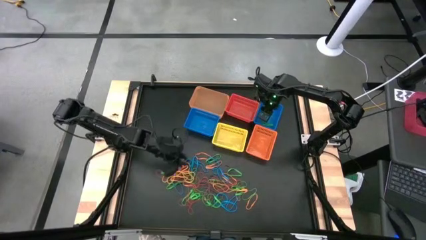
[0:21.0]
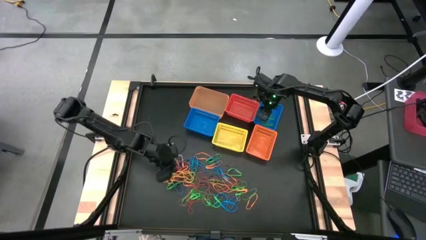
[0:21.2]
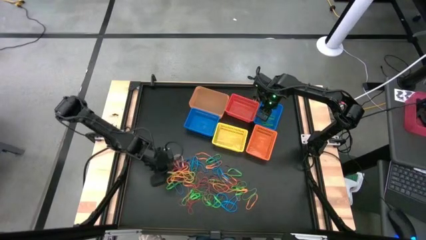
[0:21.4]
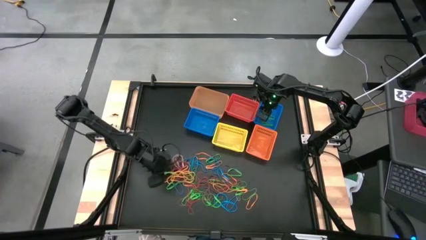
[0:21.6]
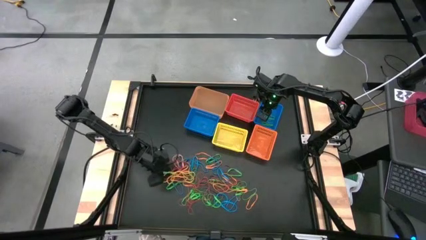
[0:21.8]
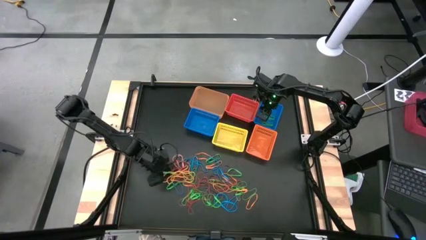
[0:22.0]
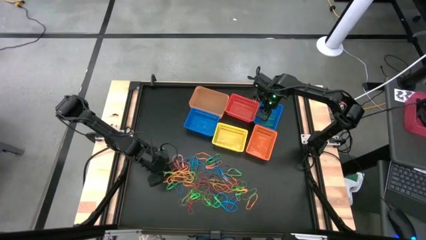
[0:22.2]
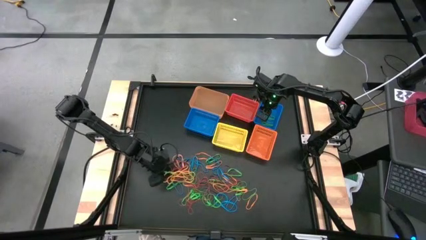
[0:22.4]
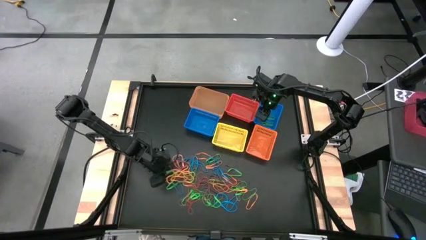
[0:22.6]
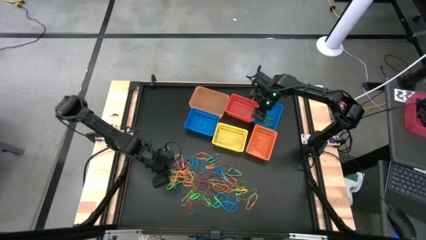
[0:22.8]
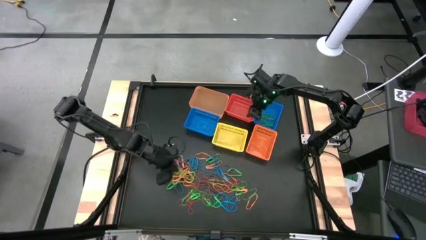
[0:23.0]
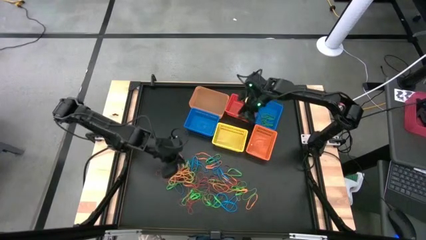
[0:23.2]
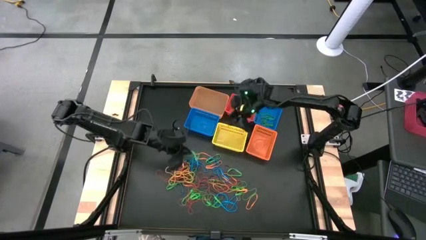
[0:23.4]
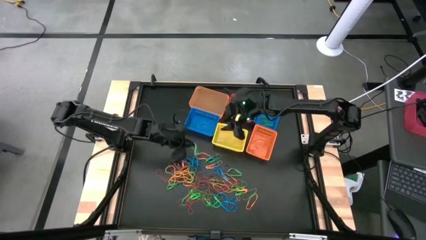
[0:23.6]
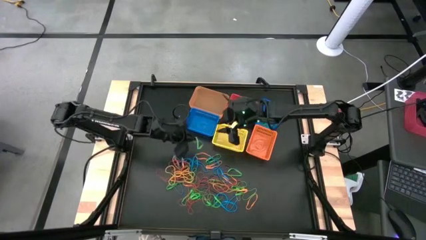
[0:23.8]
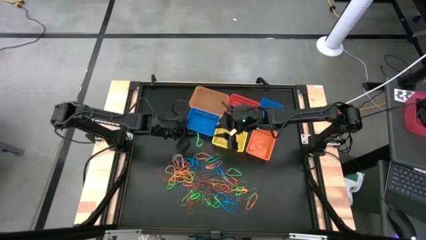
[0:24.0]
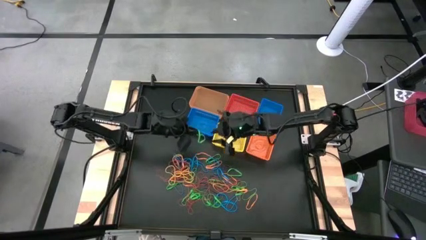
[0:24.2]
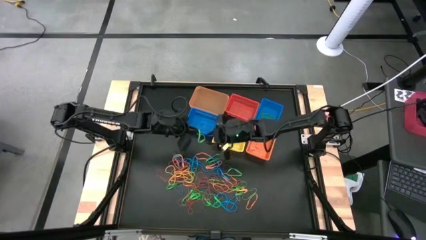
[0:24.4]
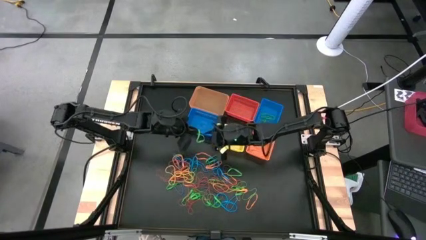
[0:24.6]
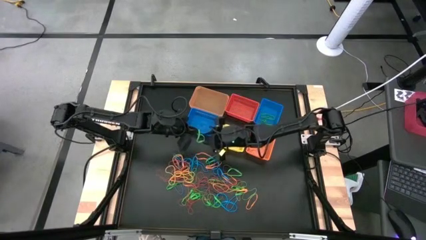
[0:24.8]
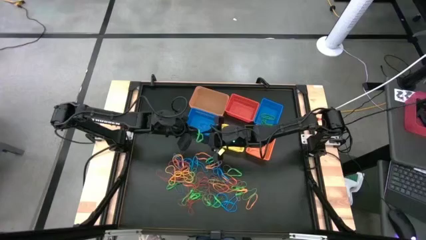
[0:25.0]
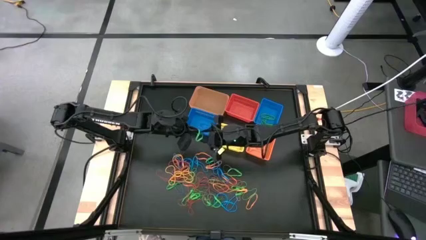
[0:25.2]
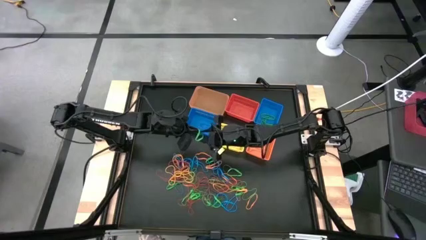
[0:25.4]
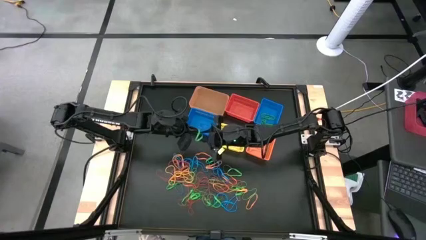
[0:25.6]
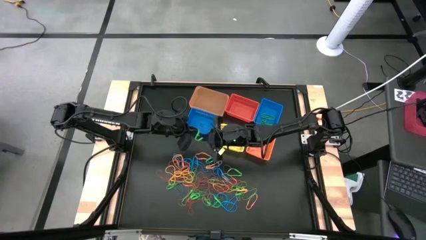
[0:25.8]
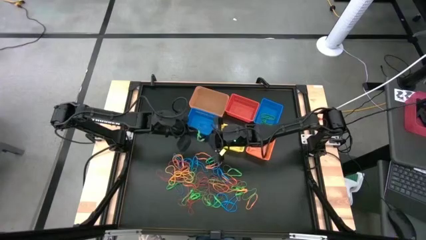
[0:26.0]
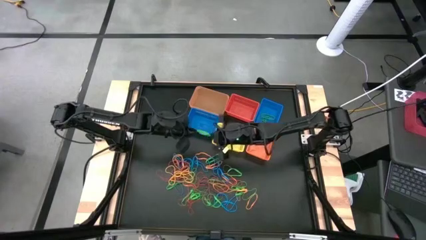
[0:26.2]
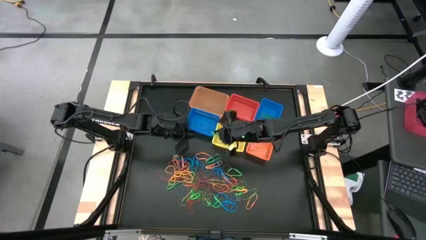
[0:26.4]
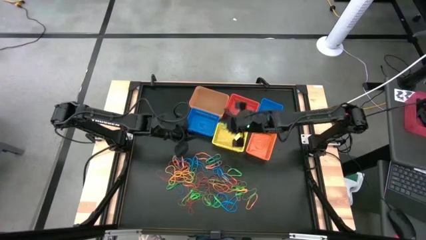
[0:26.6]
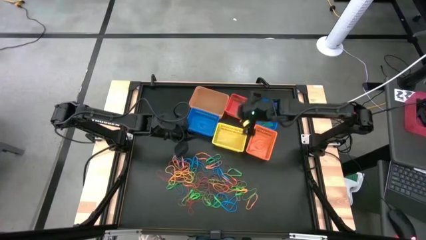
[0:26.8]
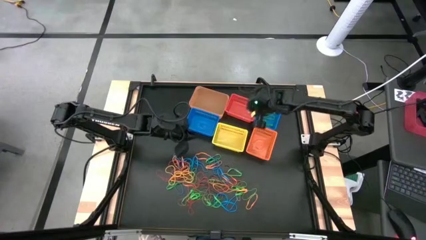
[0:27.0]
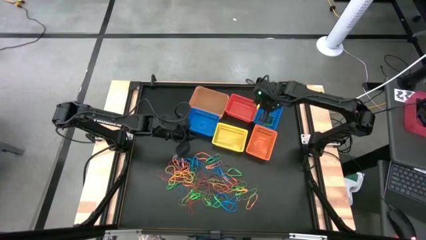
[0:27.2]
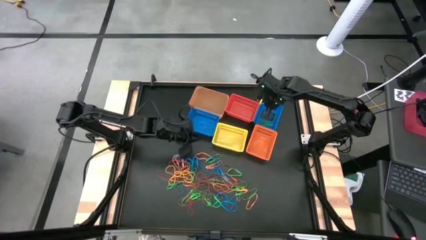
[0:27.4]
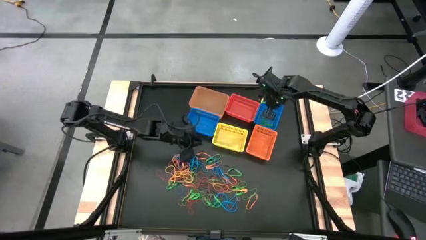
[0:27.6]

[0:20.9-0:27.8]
Task: Sort rubber bands into baskets
Put the green rubber band into the right blue basket

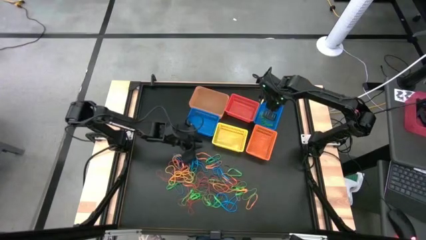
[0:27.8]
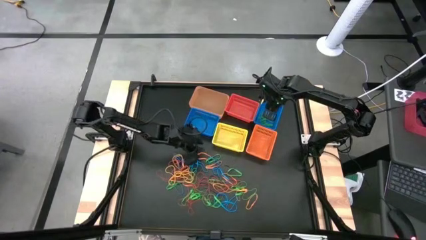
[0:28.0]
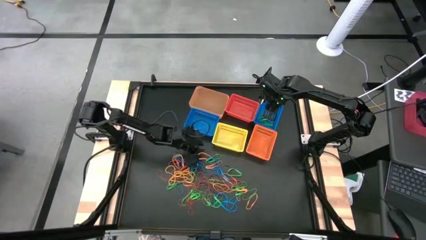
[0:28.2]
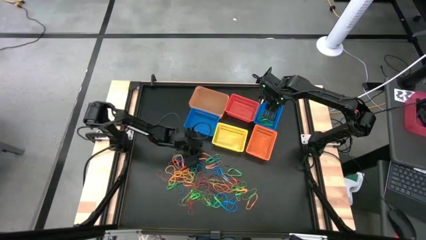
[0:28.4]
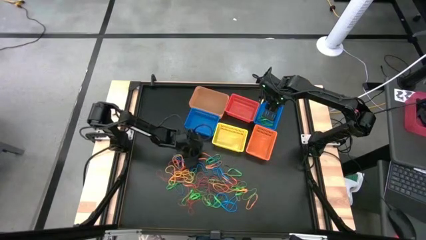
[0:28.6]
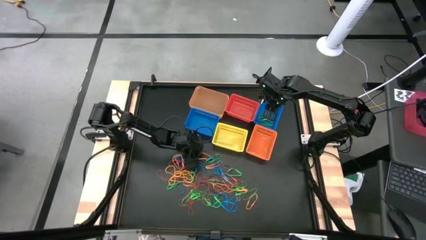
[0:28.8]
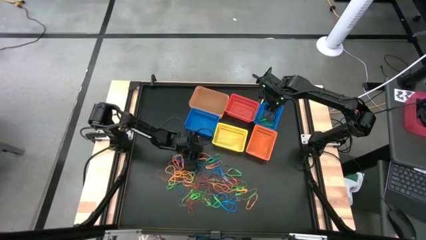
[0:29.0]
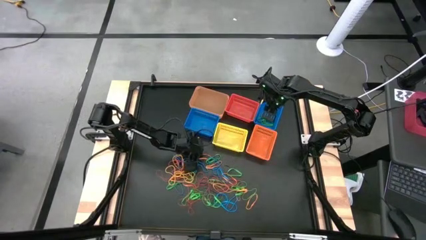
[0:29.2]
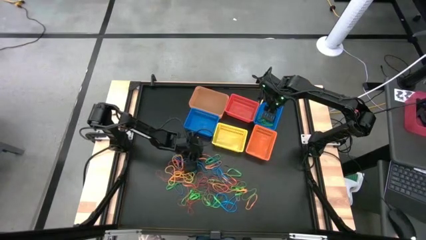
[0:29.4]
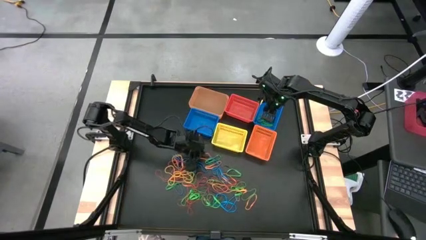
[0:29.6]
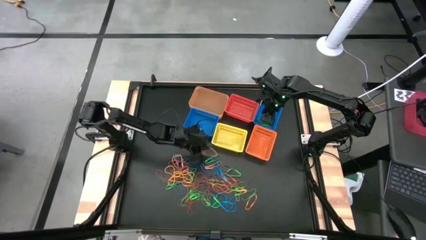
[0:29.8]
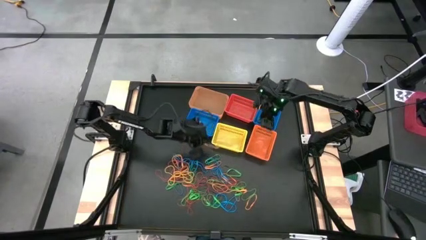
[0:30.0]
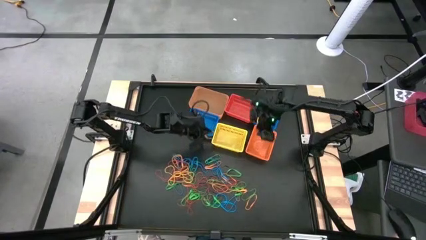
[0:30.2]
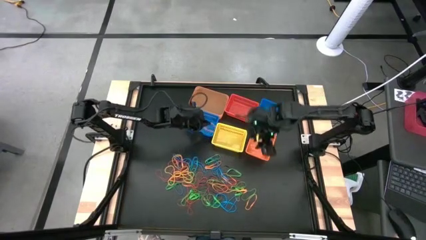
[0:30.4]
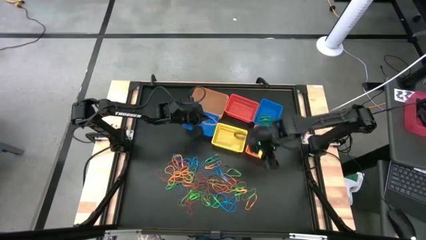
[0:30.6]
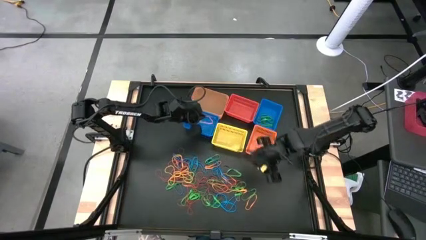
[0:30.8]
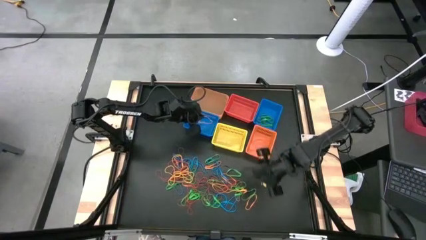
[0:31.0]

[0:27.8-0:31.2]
Put the orange rubber band into the left blue basket

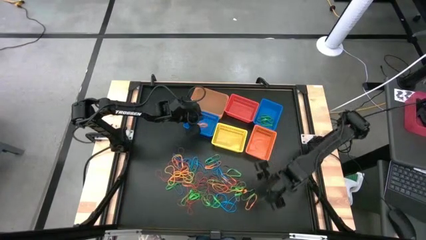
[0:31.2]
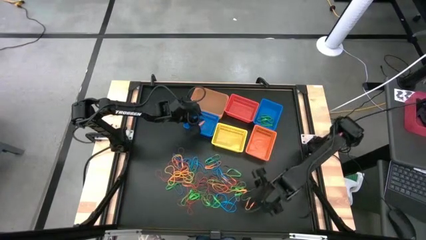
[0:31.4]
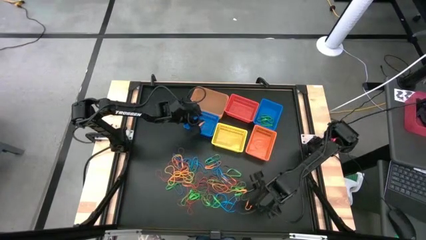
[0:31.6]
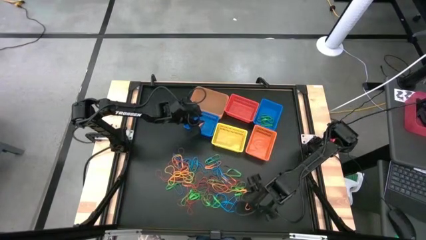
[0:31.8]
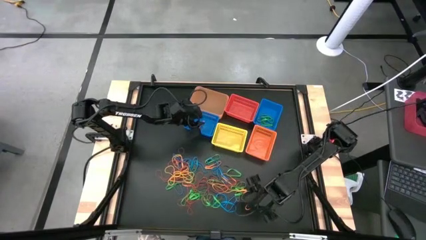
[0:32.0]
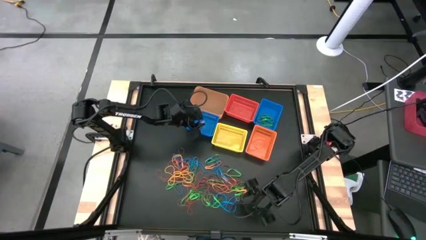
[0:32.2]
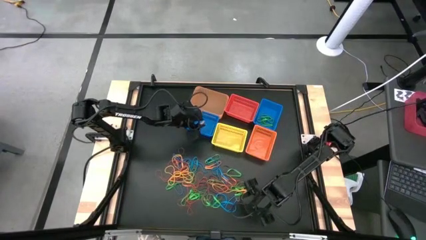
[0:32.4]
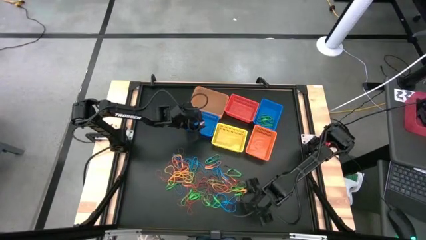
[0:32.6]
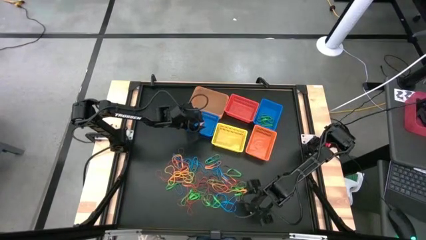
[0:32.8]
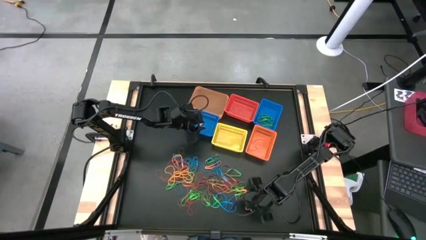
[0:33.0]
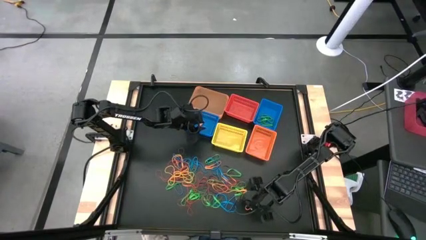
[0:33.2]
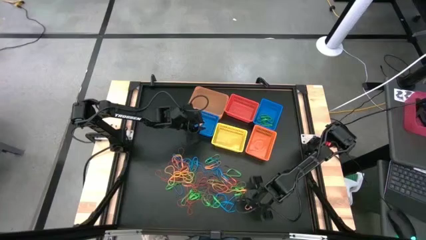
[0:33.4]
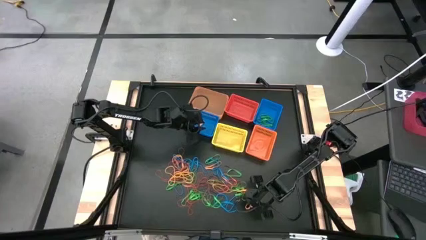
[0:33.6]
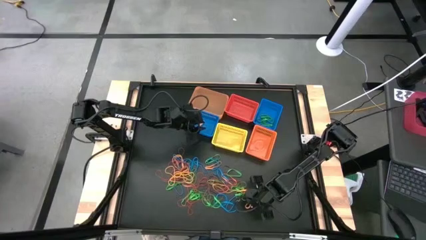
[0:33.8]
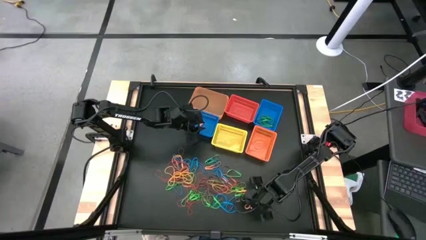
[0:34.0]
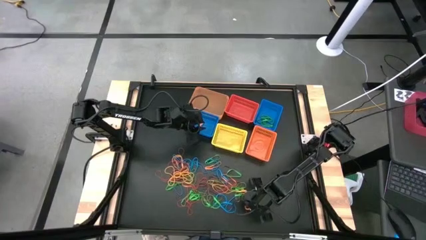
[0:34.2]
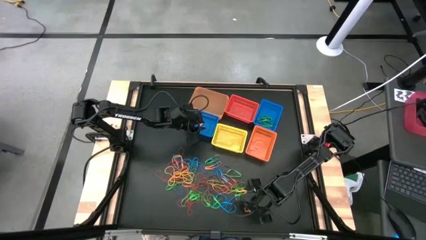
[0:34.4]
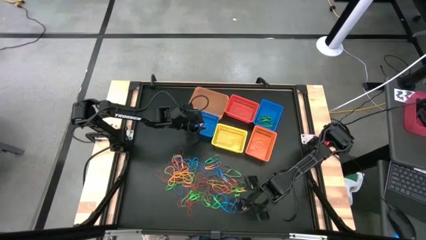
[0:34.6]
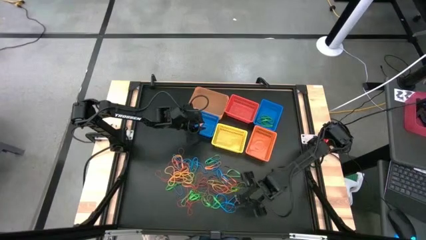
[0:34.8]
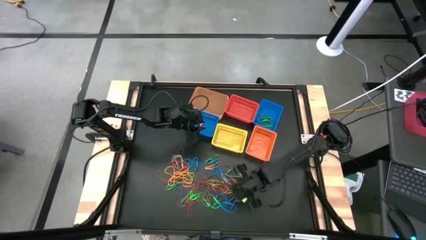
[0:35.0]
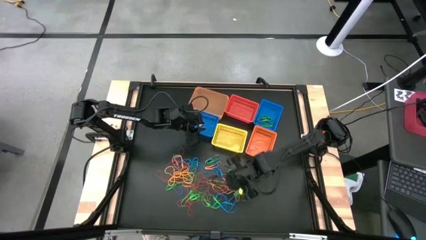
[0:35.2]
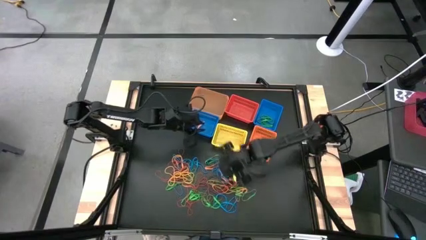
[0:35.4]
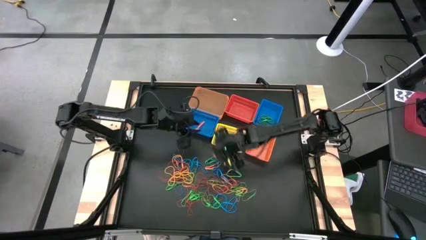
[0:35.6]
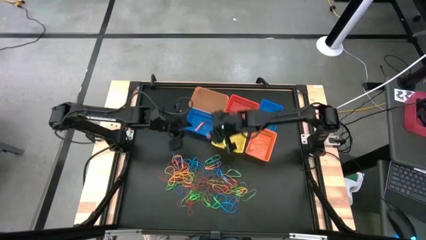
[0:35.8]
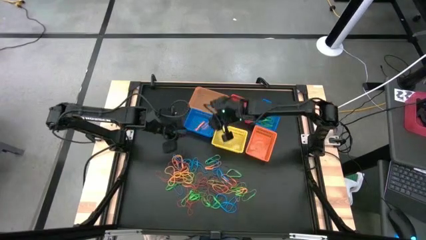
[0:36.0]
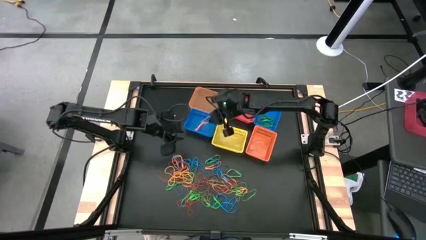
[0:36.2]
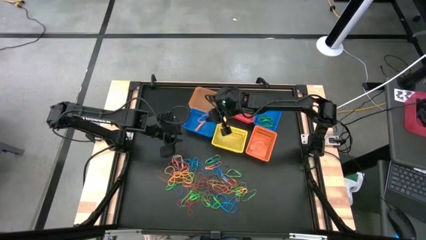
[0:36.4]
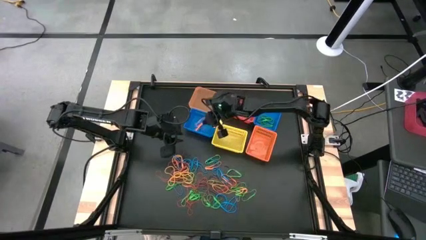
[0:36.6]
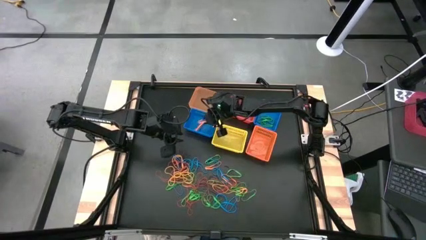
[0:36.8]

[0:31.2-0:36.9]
Put the orange rubber band into the left blue basket

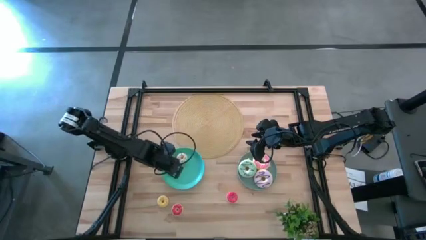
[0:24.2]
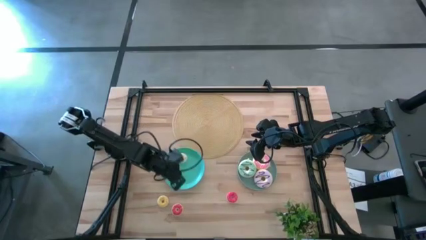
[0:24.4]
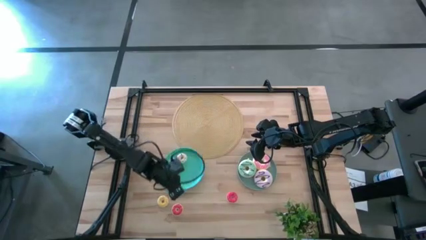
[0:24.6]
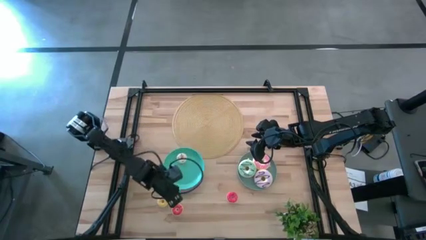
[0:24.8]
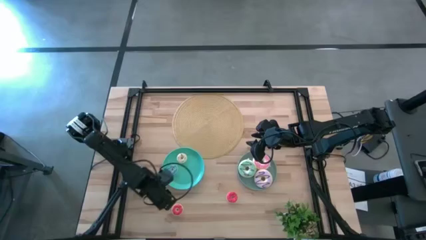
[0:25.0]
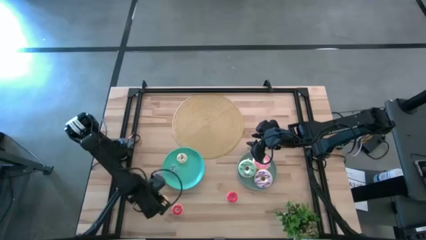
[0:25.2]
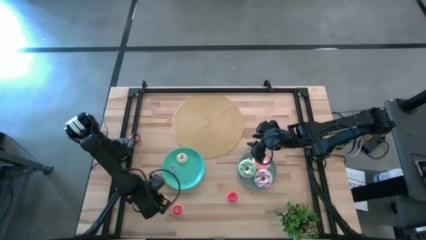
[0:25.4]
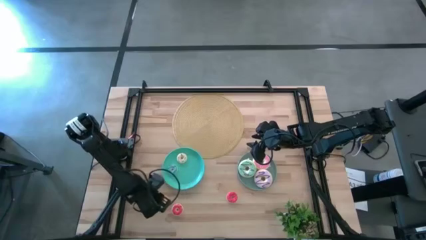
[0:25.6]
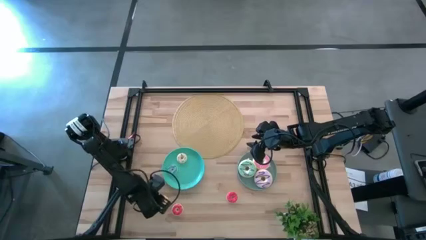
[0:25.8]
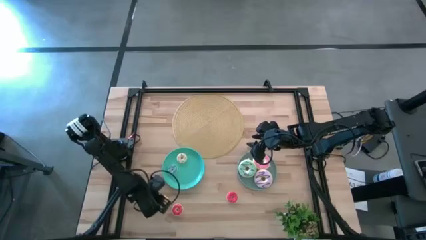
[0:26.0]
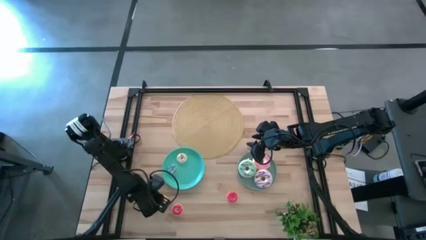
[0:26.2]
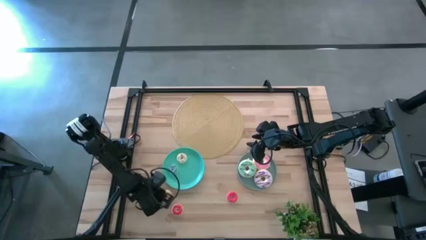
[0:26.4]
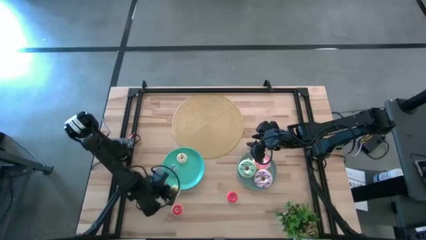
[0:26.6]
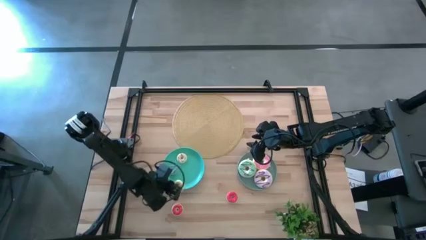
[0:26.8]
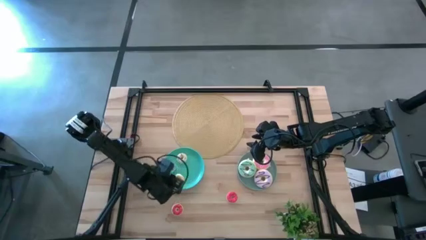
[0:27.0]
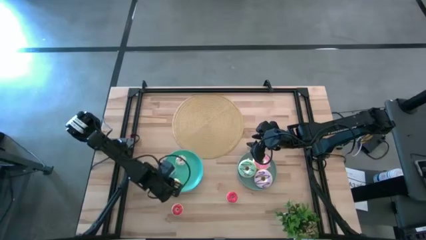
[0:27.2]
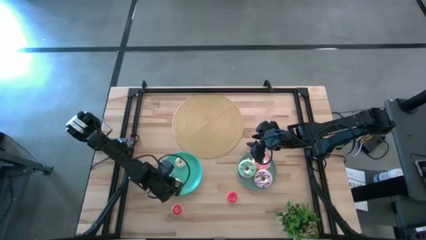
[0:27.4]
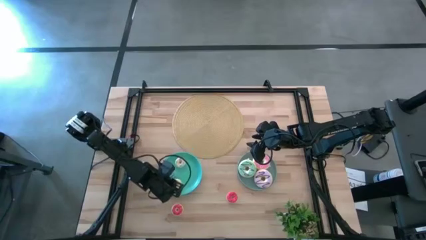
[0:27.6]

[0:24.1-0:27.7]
Task: Pick & Place donuts
Put the small yellow donut on the light green plate
